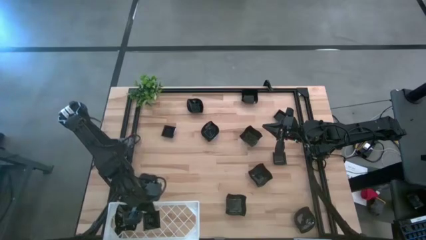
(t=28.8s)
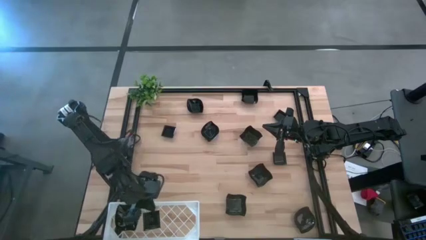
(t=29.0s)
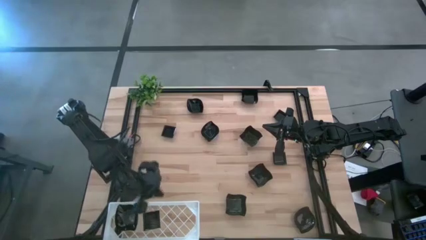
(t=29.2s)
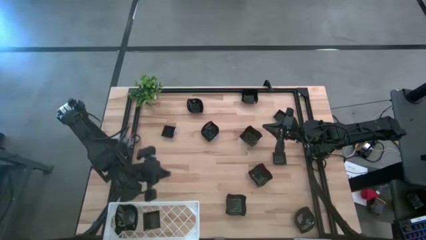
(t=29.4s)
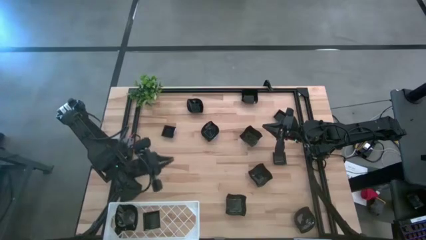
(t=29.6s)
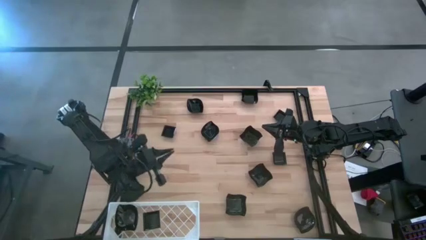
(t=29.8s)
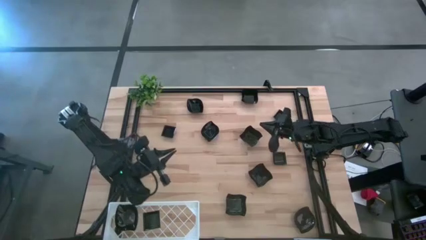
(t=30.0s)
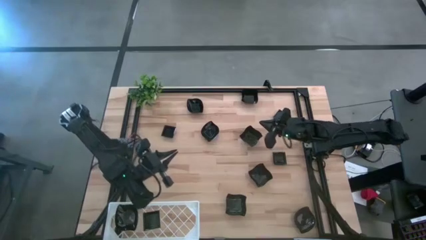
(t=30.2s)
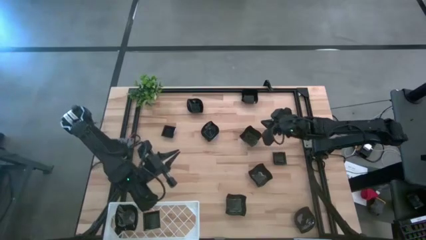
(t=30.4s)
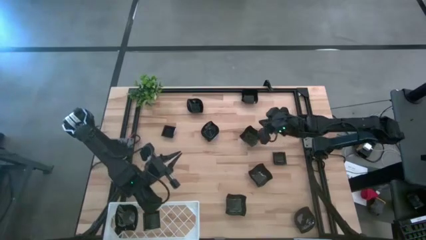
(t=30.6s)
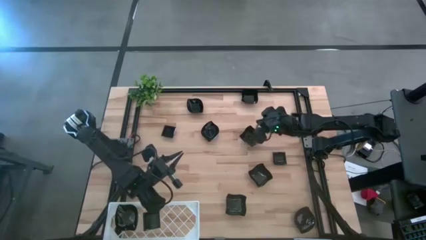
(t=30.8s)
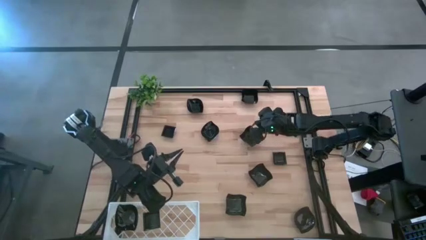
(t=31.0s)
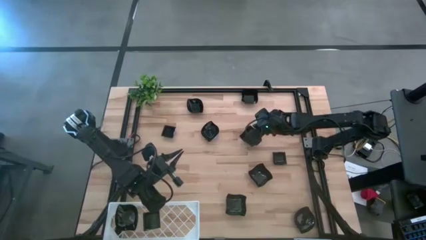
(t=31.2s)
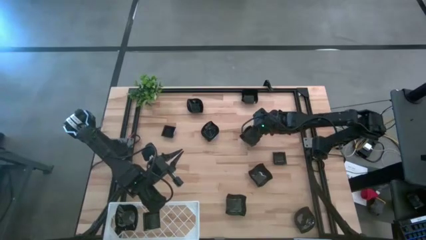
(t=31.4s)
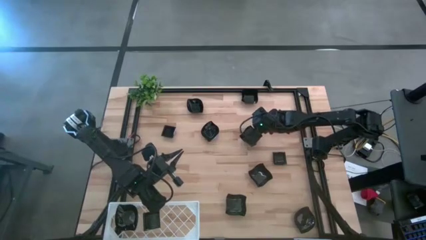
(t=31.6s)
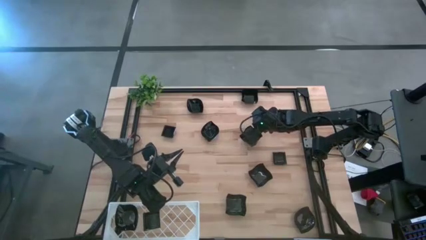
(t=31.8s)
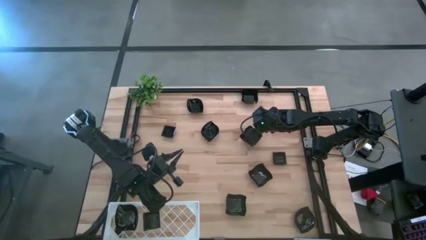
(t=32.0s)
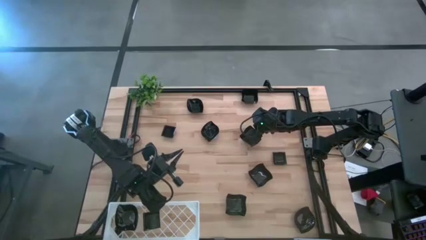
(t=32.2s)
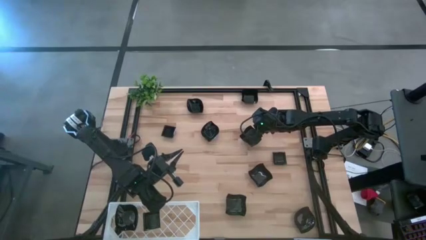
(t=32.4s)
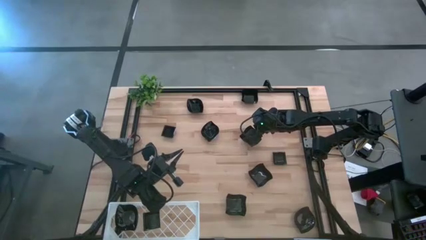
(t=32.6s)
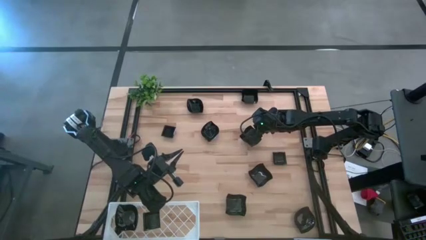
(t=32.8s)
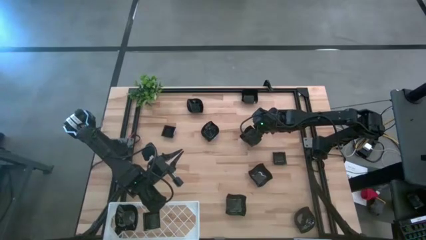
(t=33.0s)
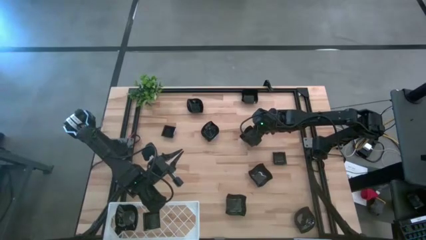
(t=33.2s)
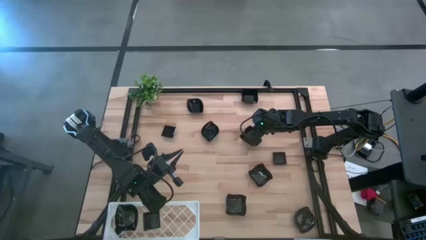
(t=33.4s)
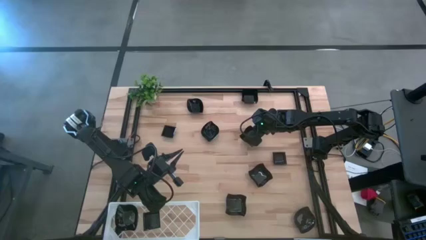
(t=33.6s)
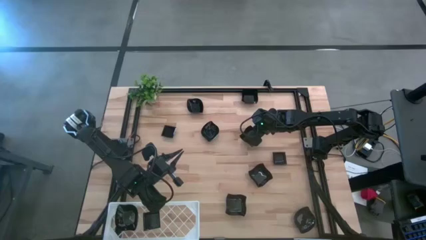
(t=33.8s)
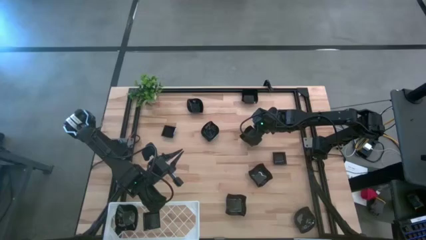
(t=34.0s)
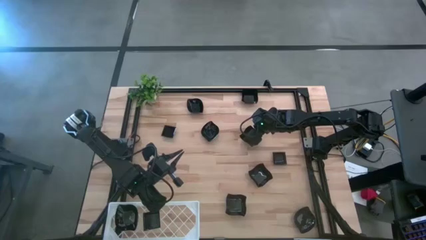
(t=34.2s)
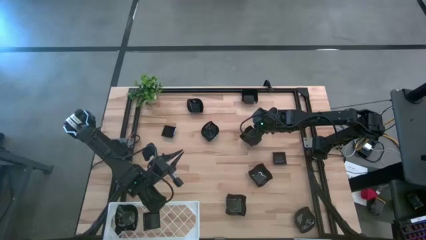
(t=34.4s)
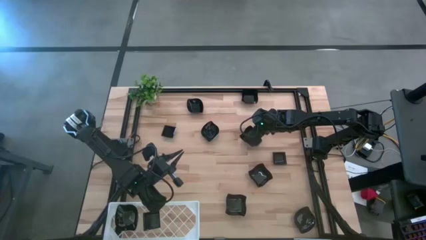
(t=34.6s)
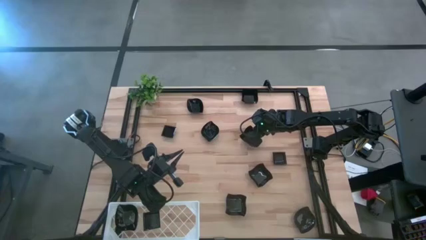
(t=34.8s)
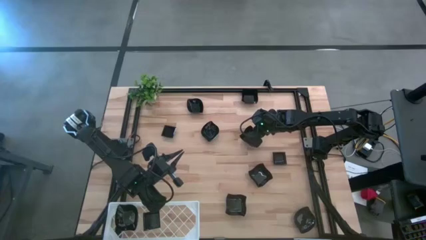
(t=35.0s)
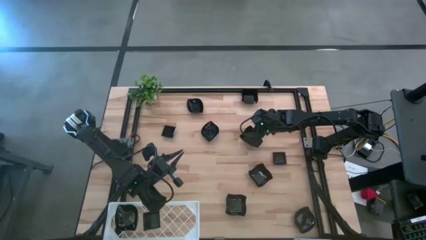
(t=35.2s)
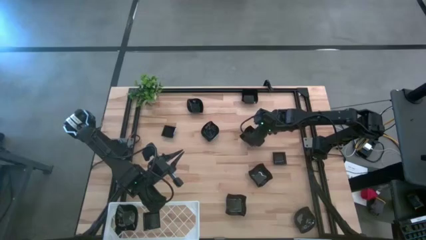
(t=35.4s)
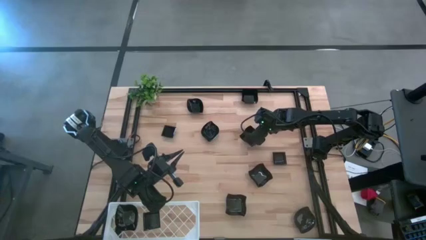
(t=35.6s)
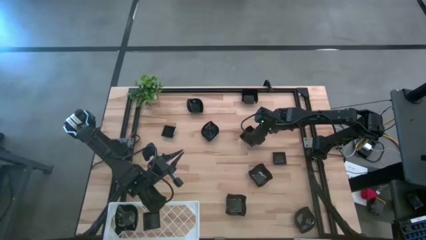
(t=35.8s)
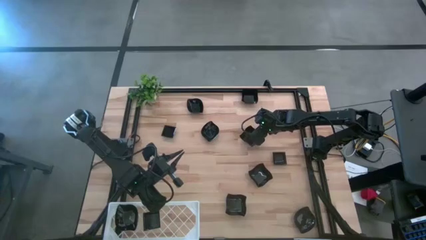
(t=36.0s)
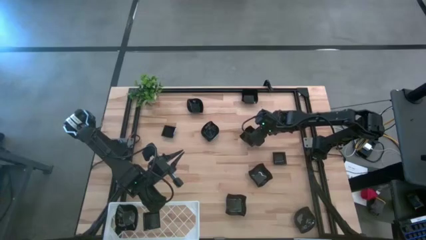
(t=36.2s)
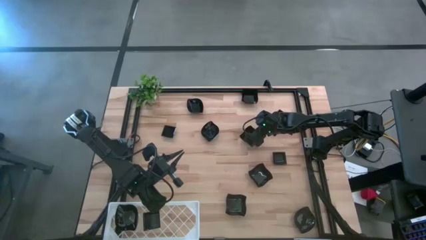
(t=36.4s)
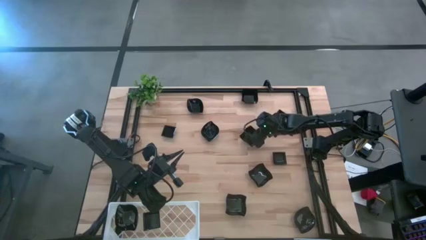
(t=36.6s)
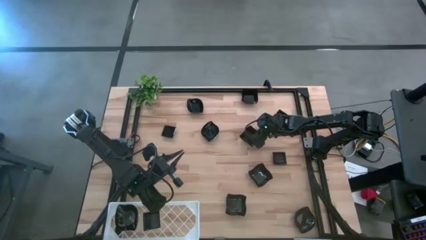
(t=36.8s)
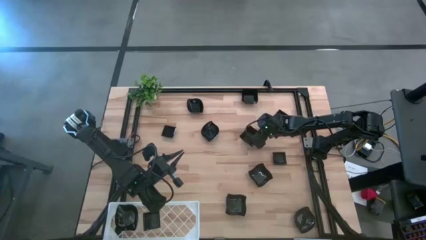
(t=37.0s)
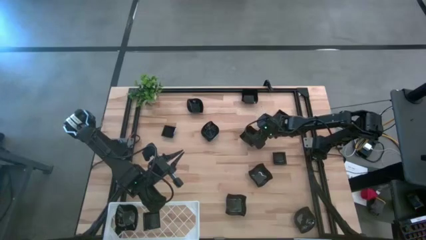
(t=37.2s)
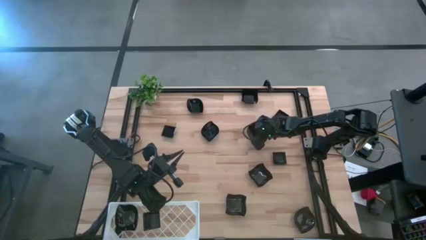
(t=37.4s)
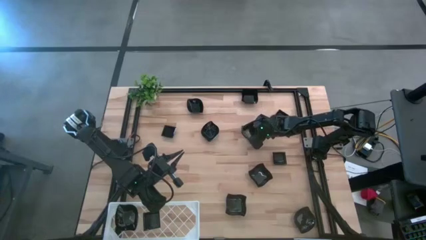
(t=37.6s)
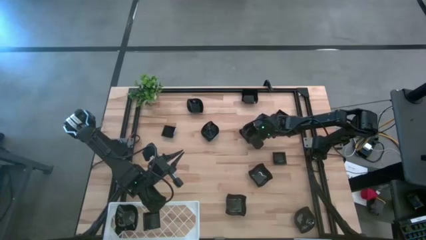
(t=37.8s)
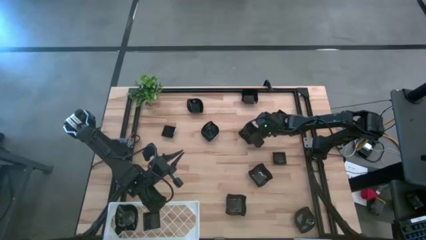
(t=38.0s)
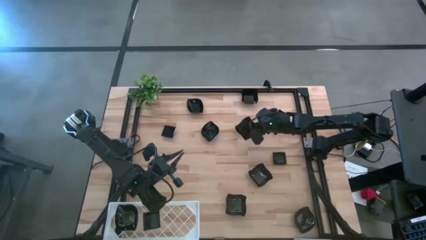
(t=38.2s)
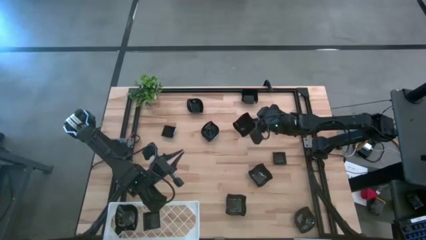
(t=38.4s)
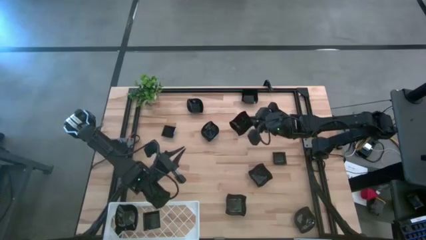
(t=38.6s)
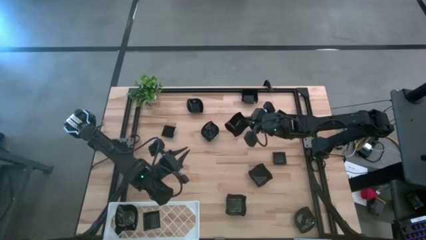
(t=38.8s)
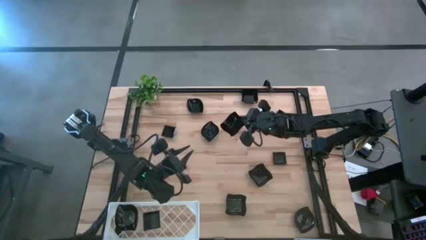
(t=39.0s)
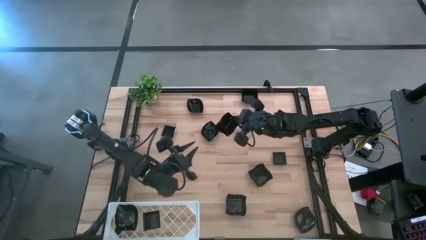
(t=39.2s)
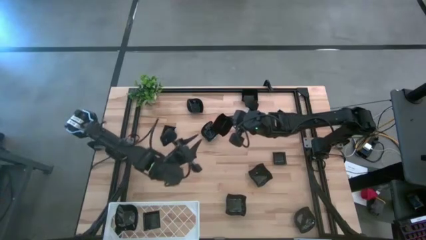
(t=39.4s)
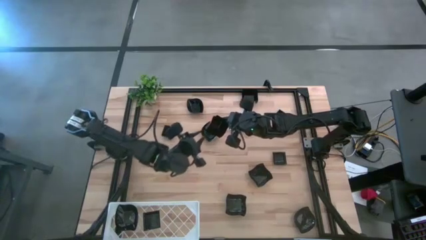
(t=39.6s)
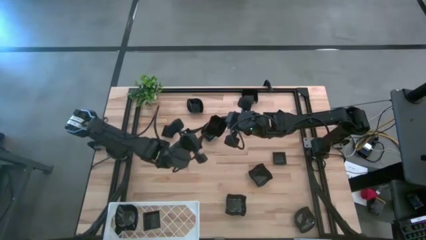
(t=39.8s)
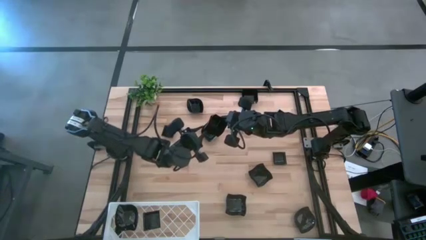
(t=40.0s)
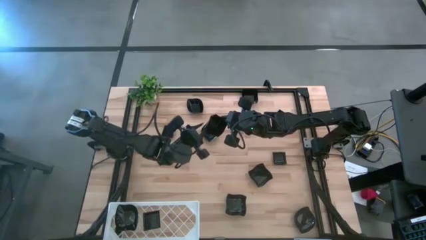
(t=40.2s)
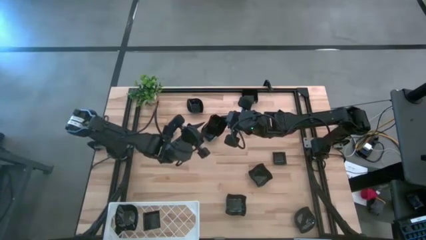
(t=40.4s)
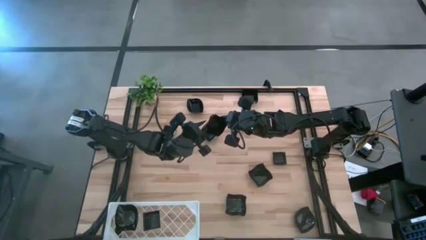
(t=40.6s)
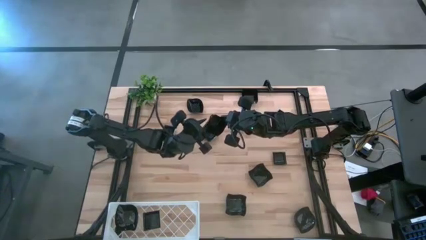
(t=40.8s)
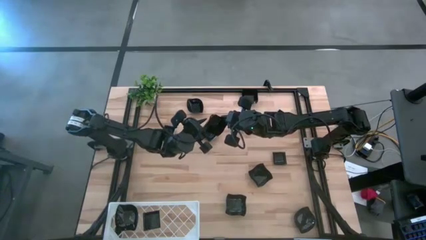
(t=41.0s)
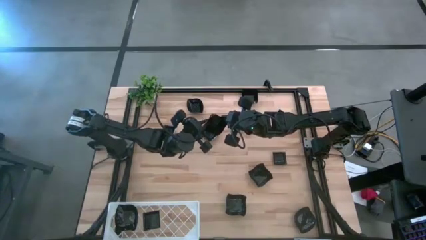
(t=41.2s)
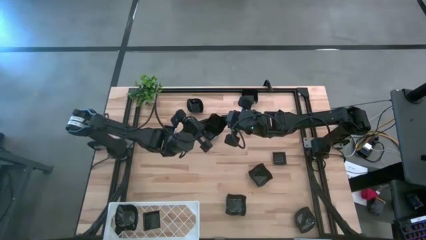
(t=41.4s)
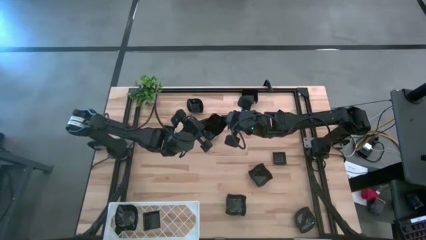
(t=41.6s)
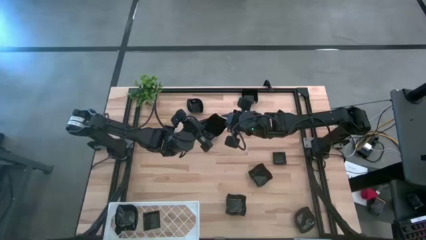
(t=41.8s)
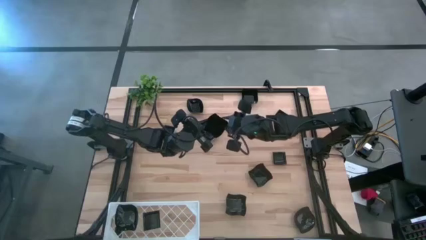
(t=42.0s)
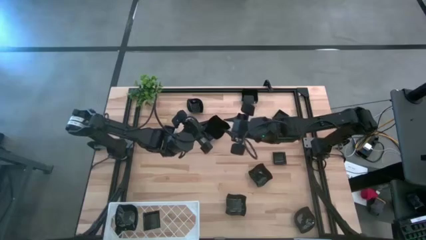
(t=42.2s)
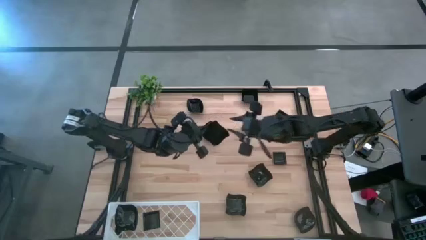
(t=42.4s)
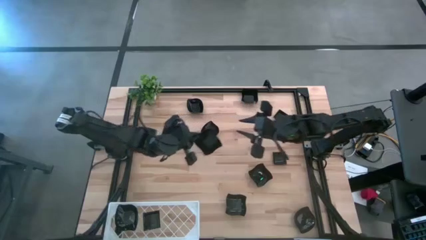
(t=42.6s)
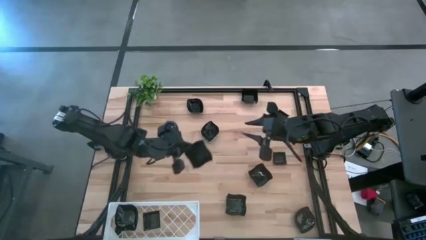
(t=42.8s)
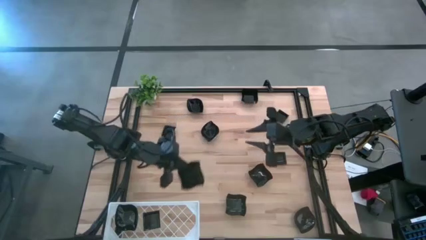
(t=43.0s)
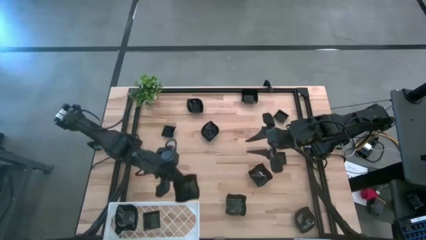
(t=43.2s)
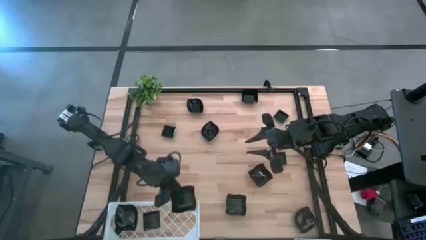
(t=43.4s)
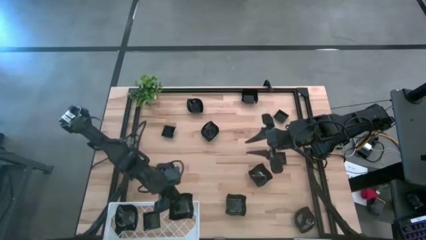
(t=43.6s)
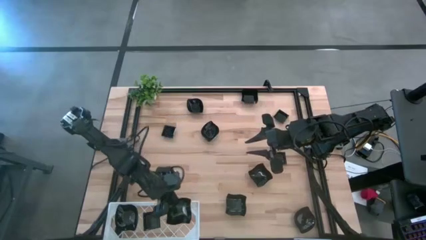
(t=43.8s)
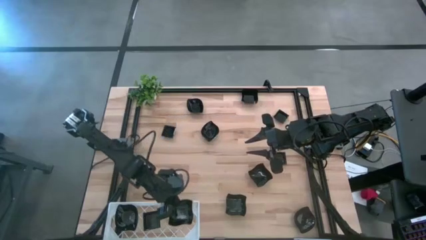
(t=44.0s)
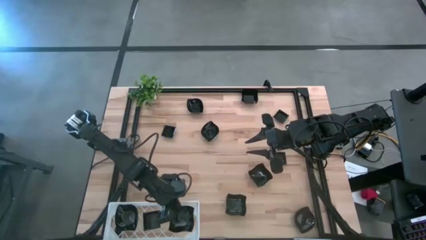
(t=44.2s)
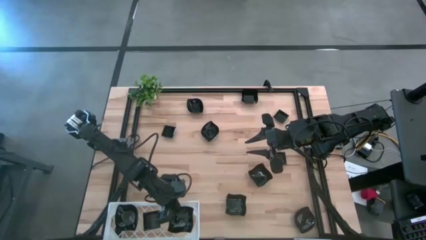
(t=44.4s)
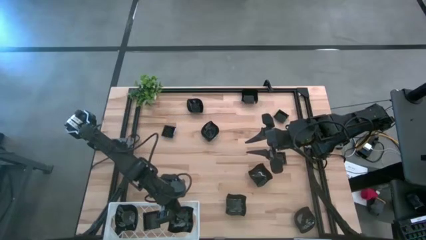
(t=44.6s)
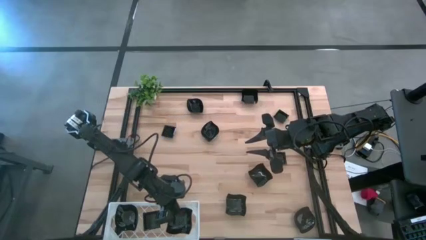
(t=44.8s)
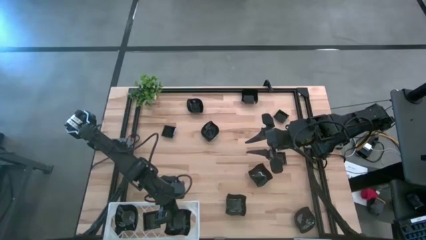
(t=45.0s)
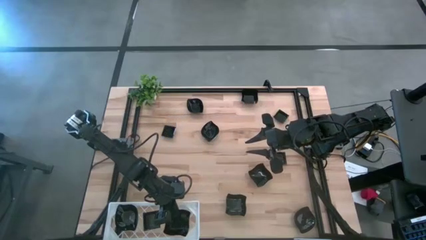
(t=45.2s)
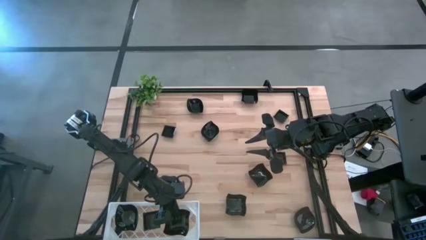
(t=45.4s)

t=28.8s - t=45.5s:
Task: Pick & Place Mini shaped plates
Put the black distorted square plate on the shelf
